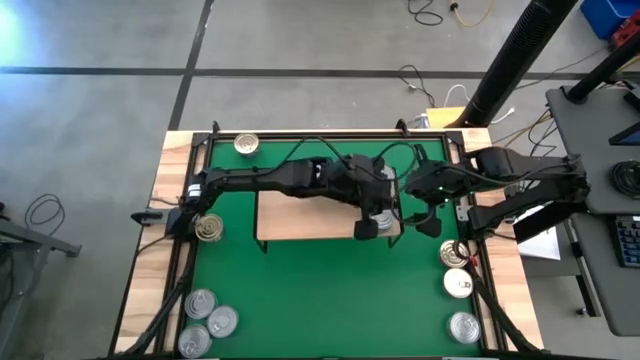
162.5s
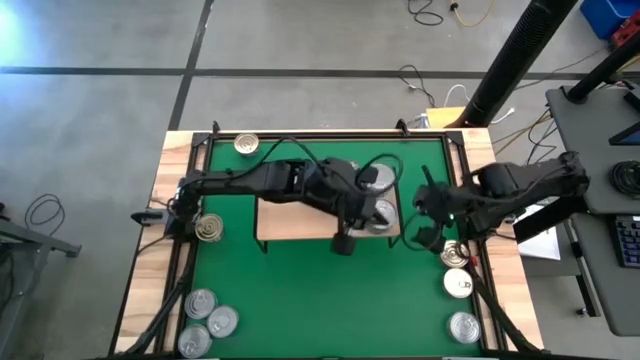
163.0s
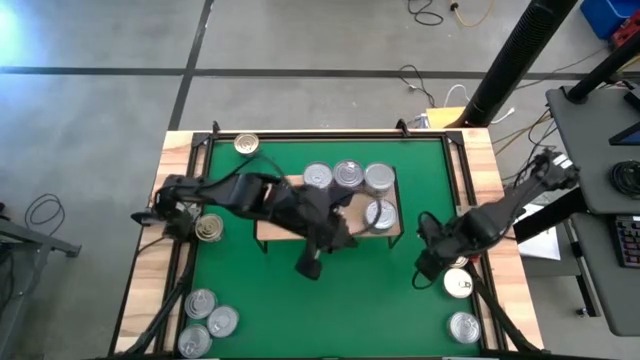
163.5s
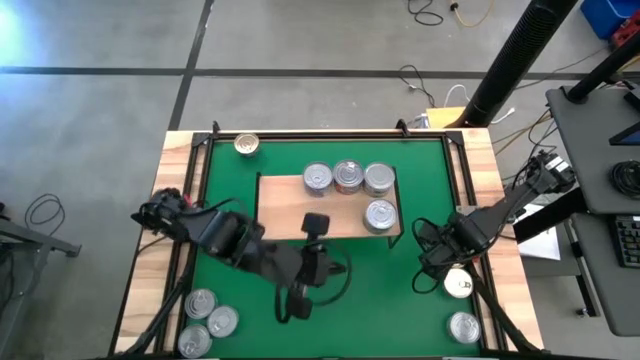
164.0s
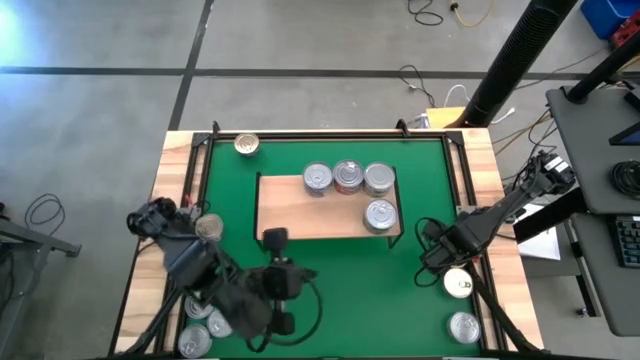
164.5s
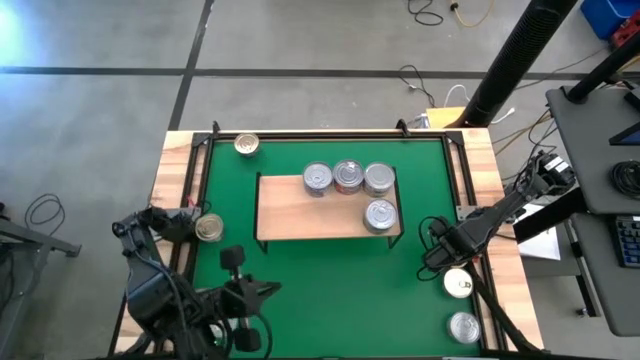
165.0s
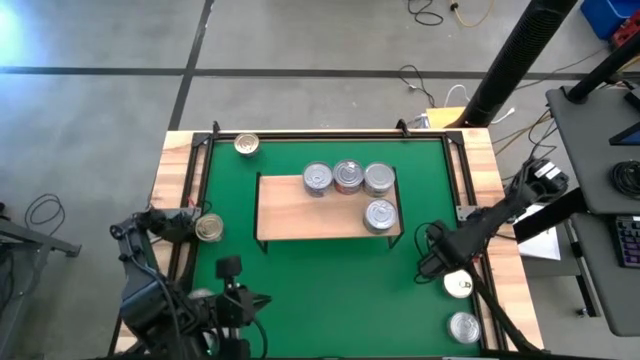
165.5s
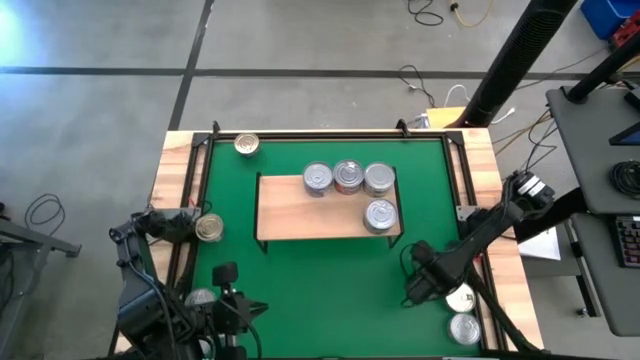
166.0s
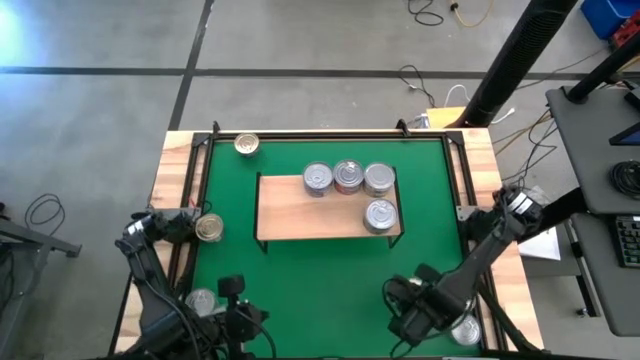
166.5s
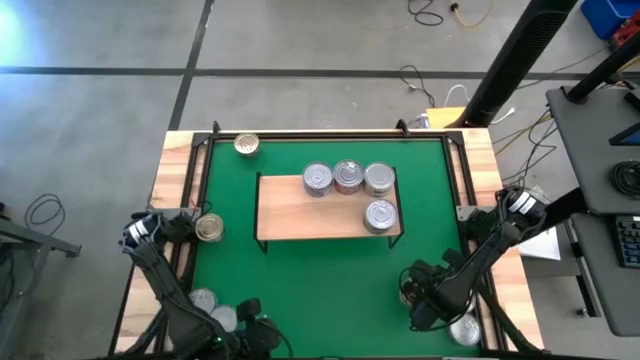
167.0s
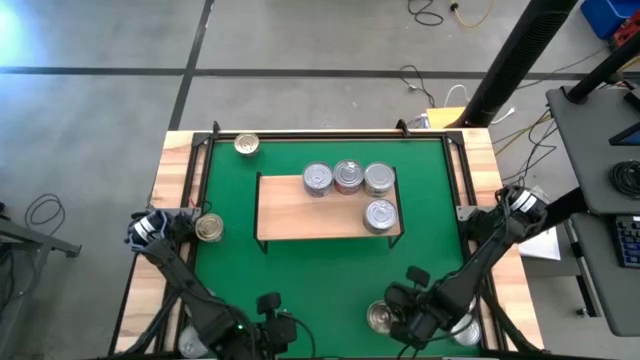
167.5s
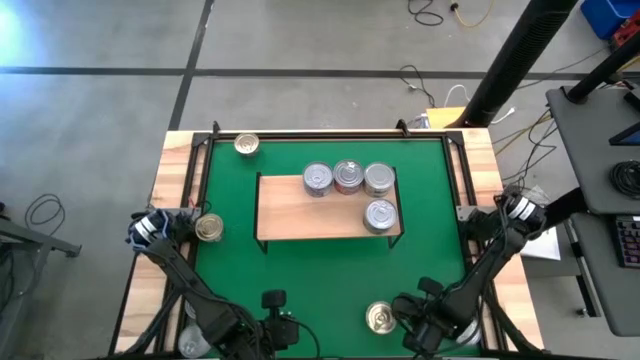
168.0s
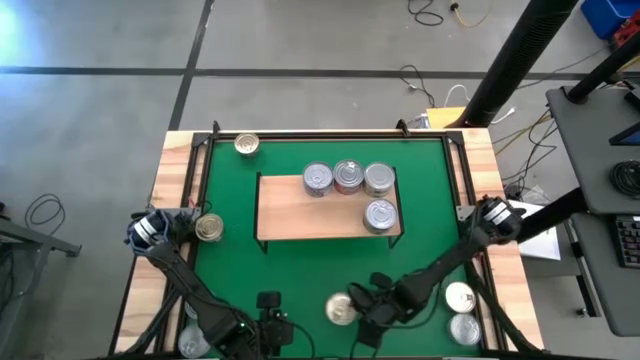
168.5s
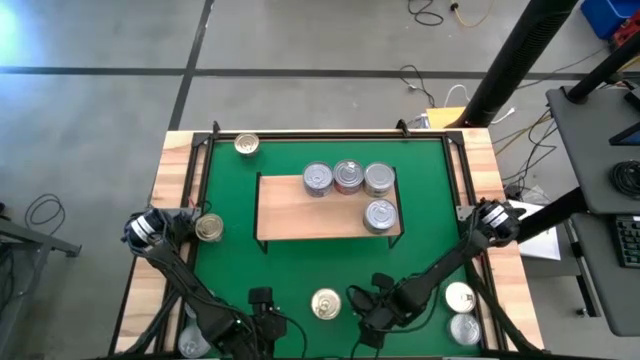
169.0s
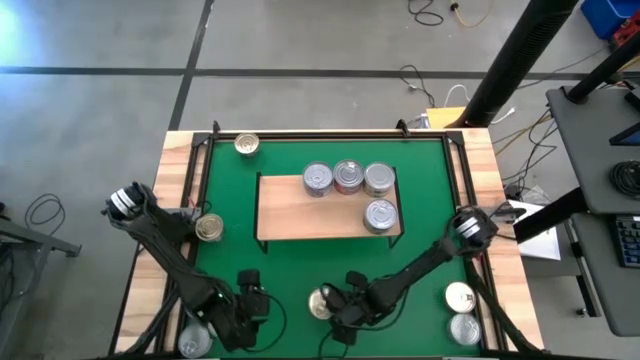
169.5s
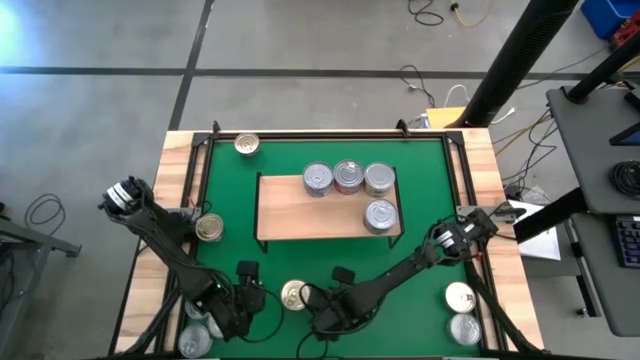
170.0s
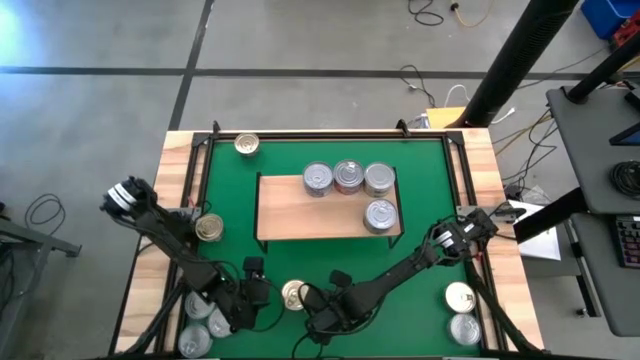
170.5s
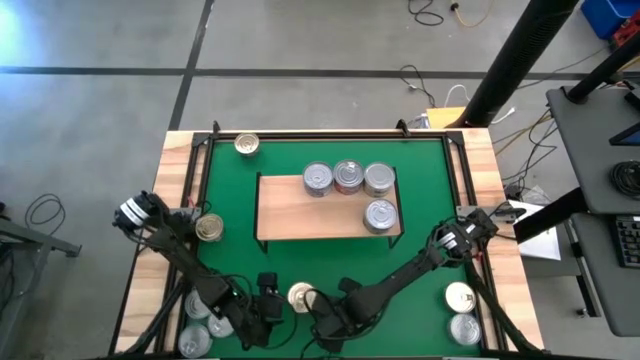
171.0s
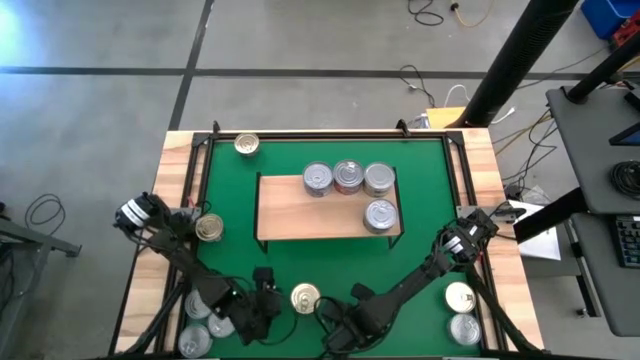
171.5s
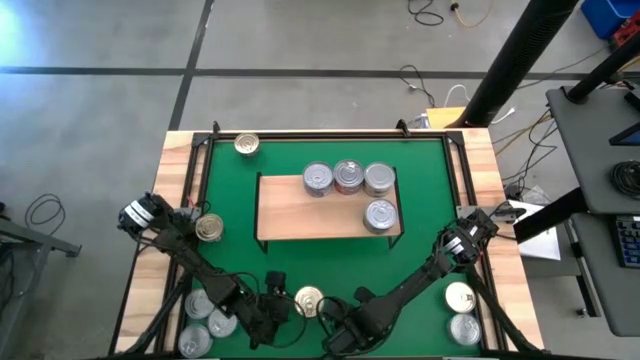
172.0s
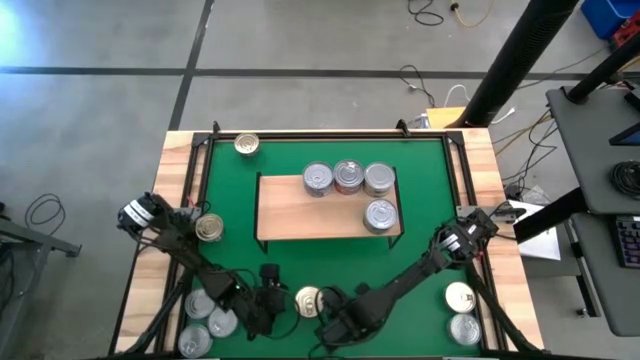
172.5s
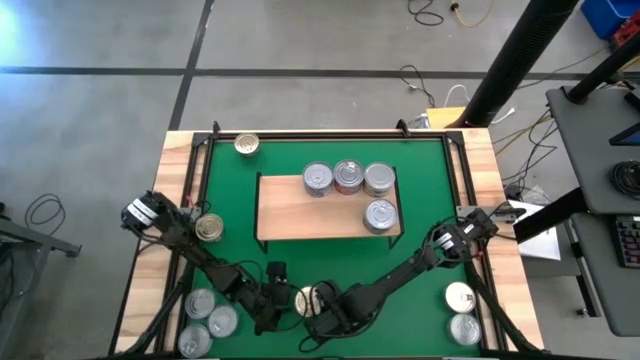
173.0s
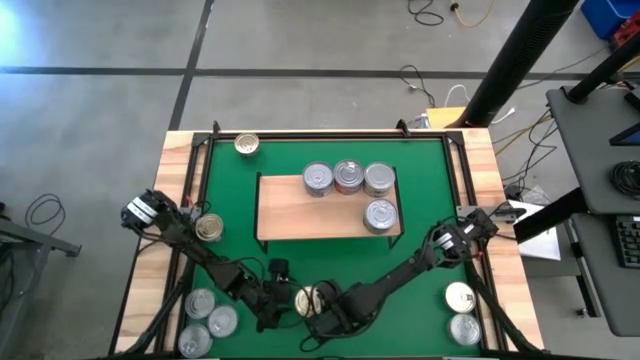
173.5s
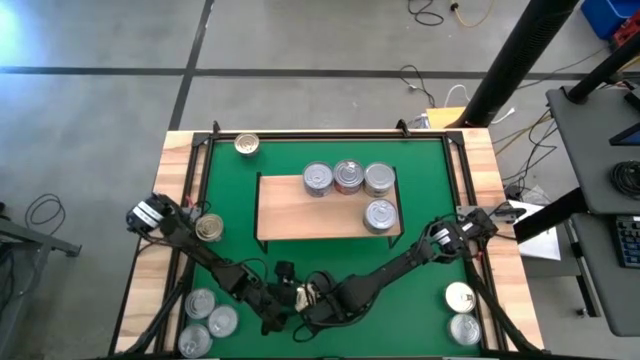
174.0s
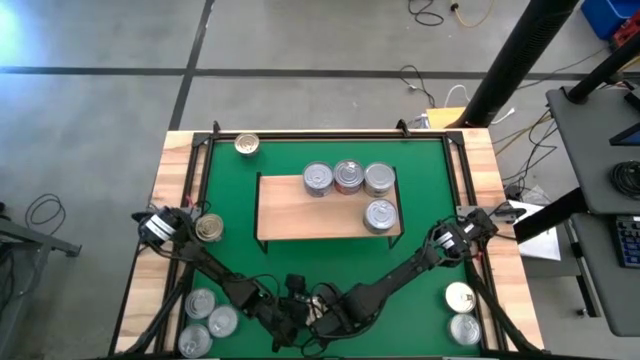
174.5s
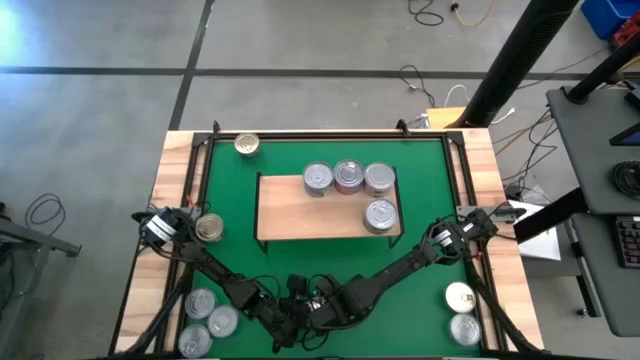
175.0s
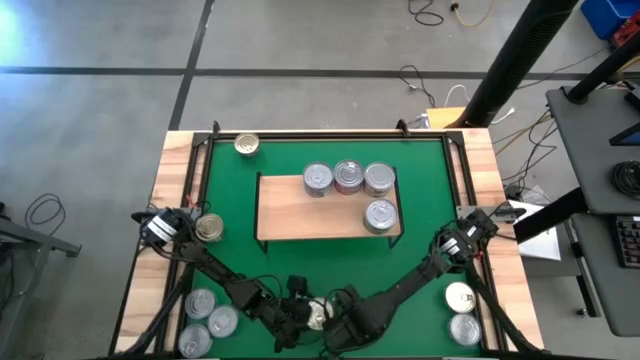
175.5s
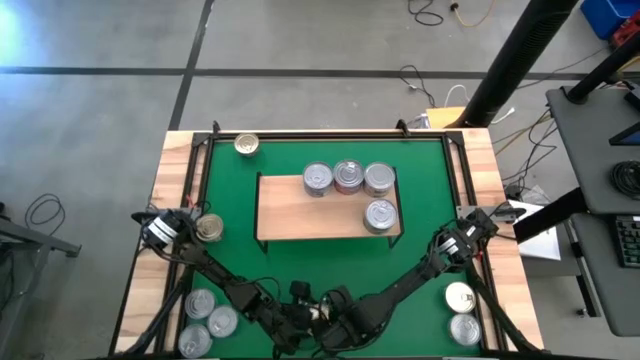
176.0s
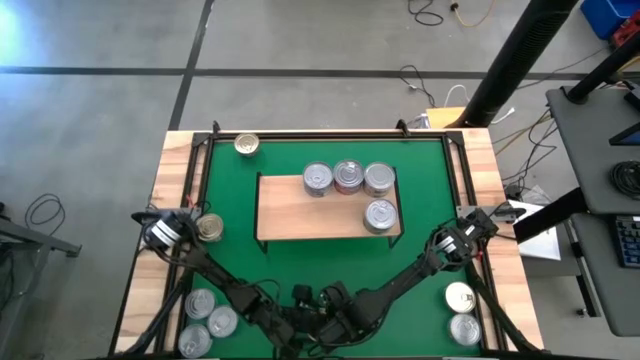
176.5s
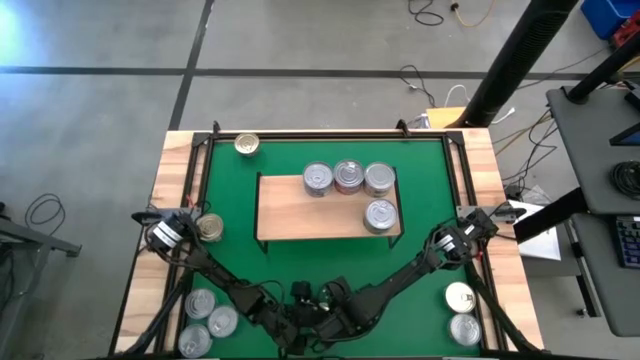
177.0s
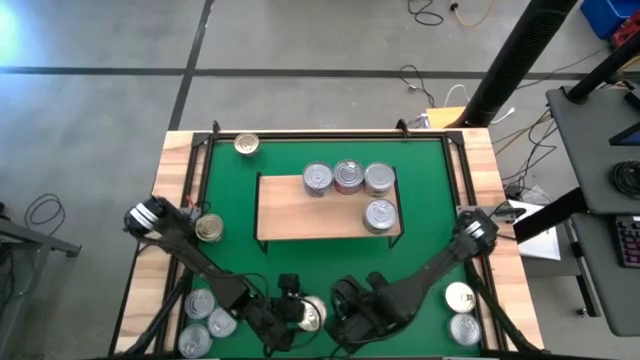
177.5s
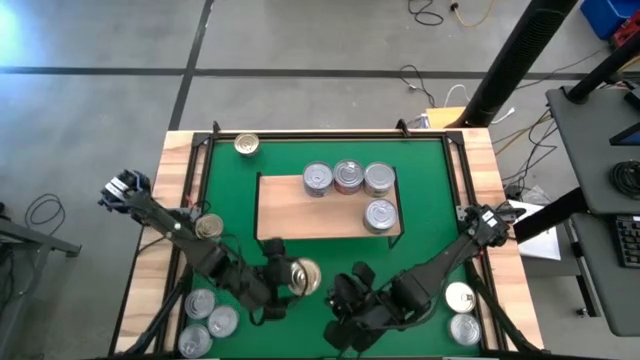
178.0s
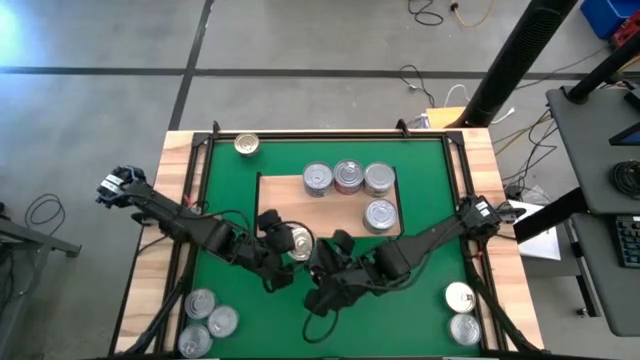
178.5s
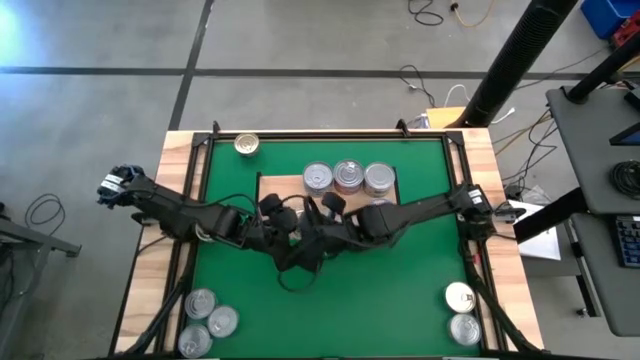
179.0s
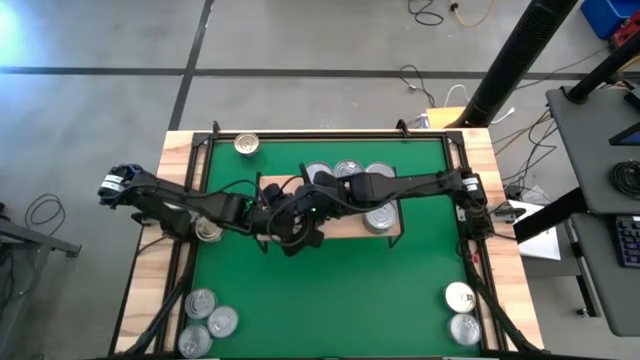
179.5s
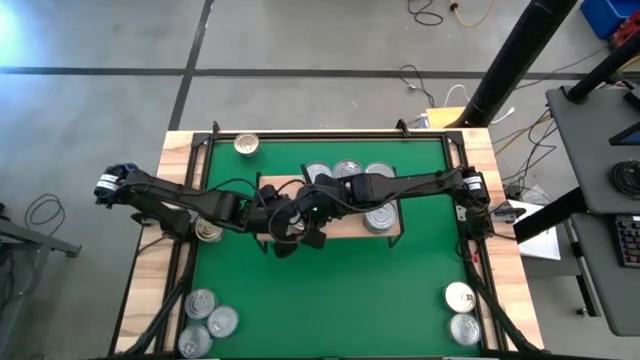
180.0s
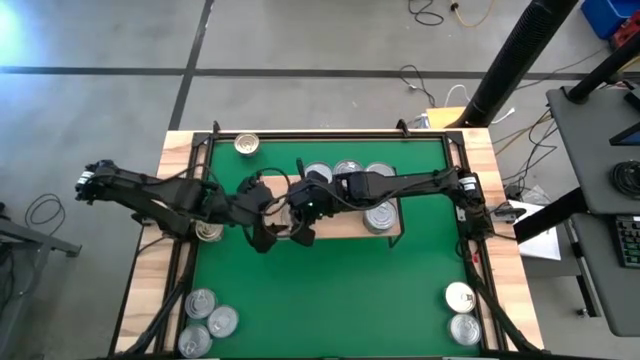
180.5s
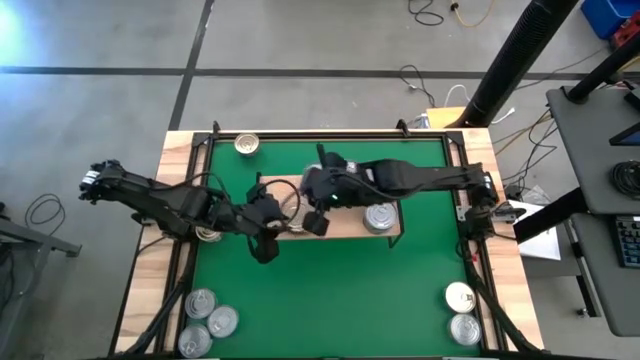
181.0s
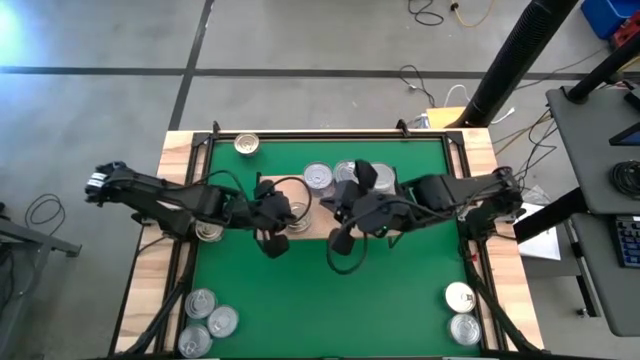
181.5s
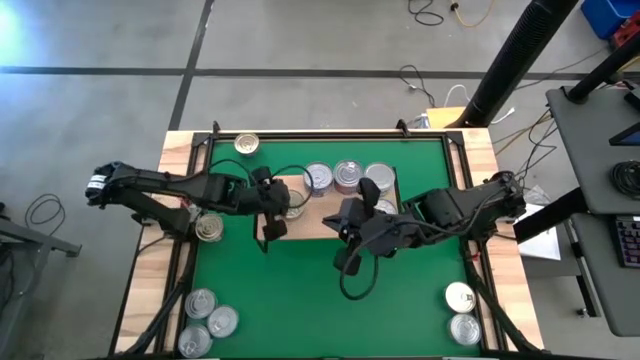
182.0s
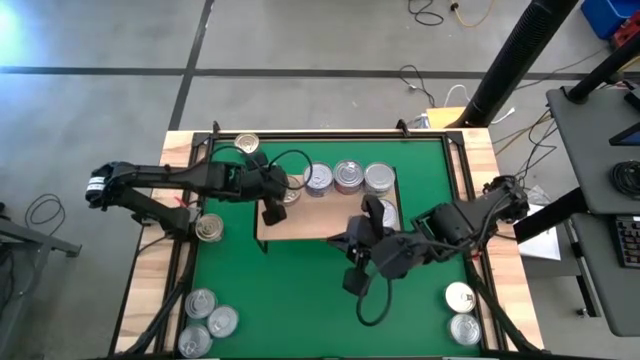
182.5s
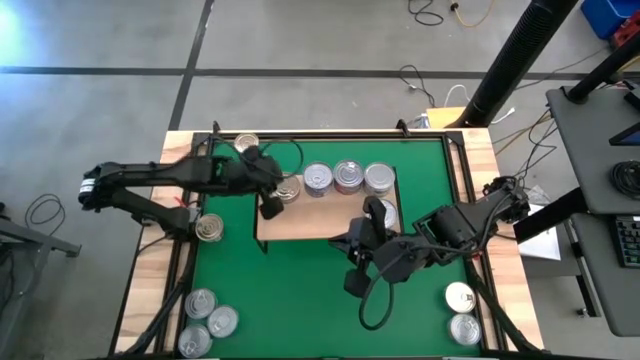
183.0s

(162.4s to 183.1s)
Task: Stack canned seafood by type on shelf
Put the middle right blue and pink tuna can on the shelf
